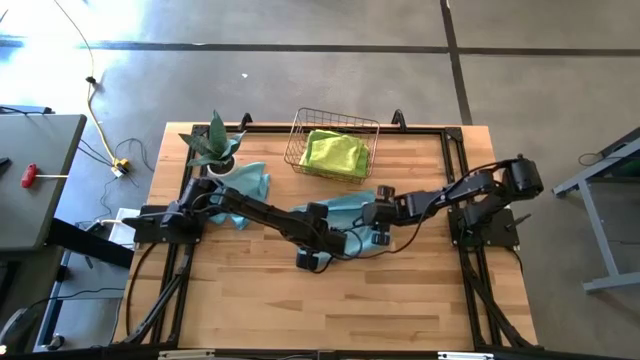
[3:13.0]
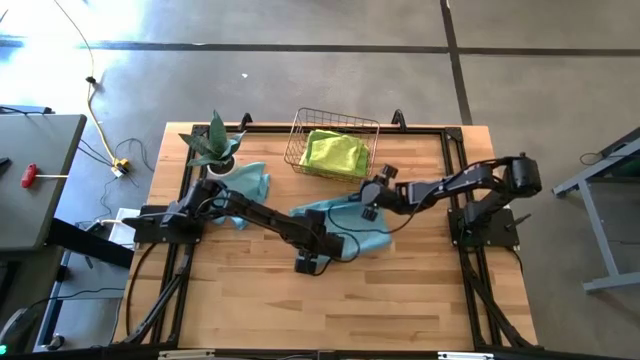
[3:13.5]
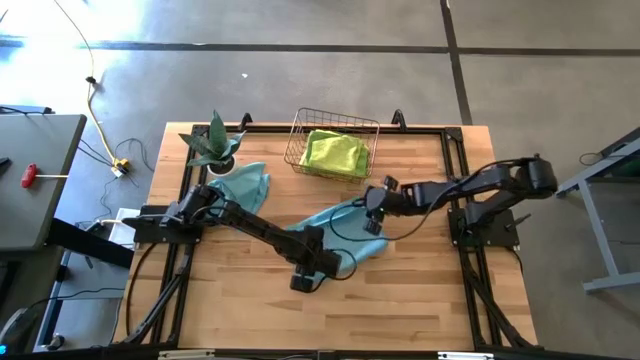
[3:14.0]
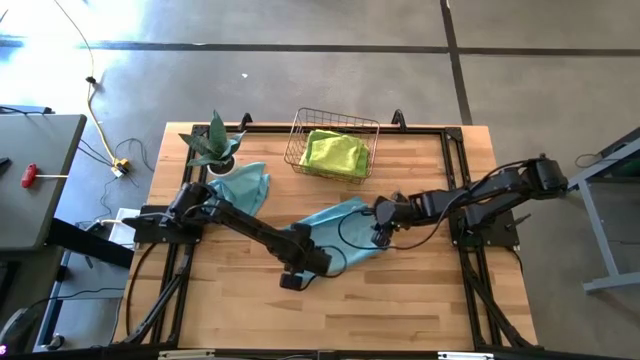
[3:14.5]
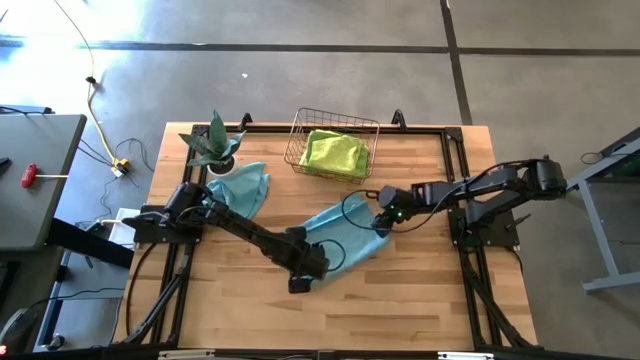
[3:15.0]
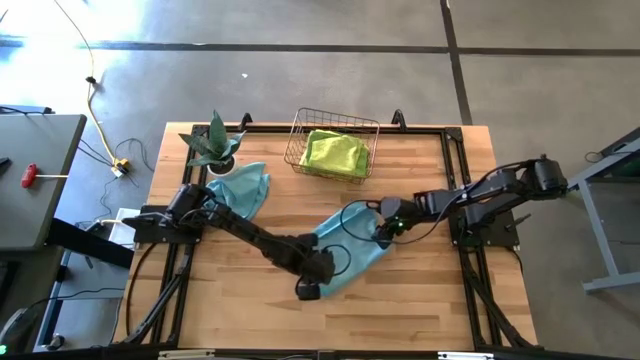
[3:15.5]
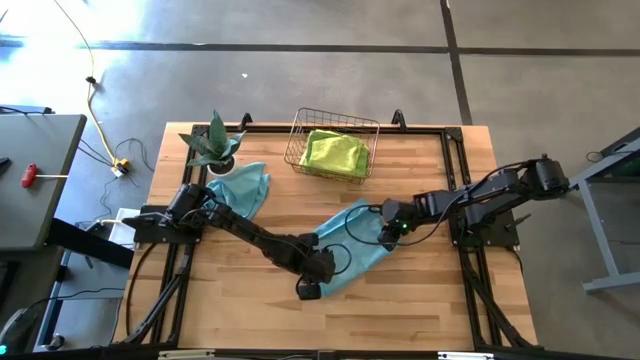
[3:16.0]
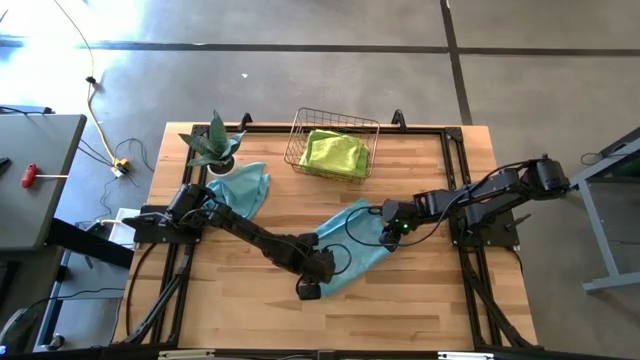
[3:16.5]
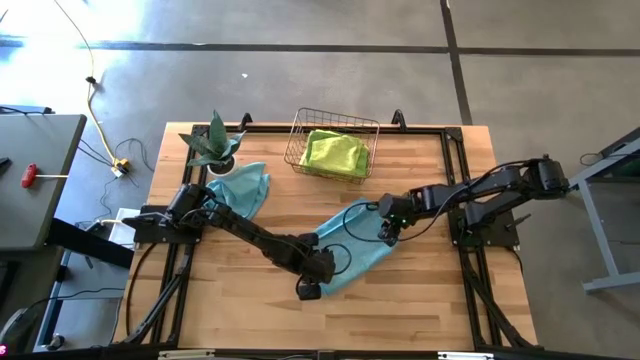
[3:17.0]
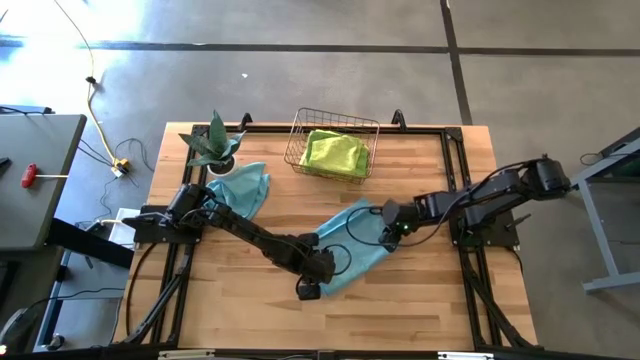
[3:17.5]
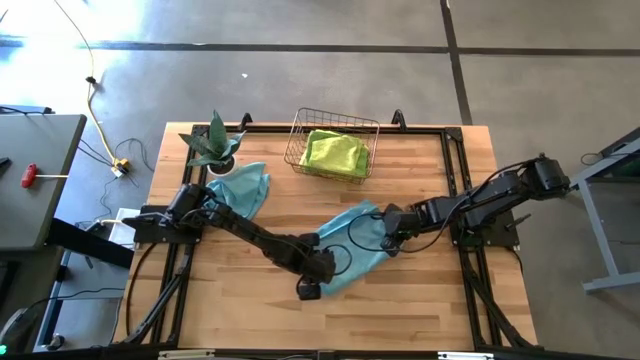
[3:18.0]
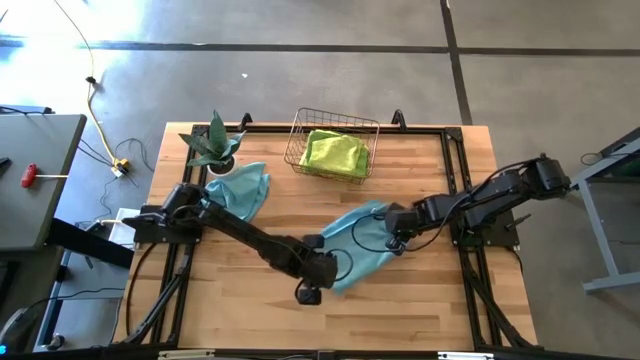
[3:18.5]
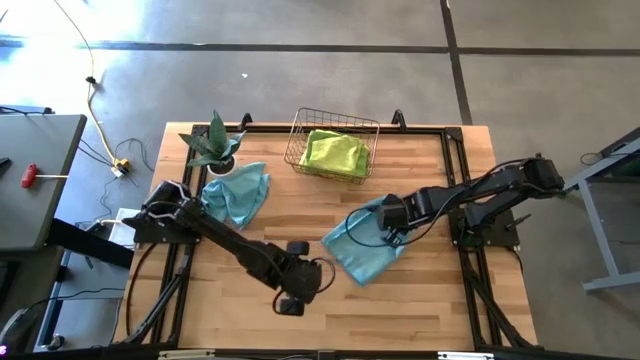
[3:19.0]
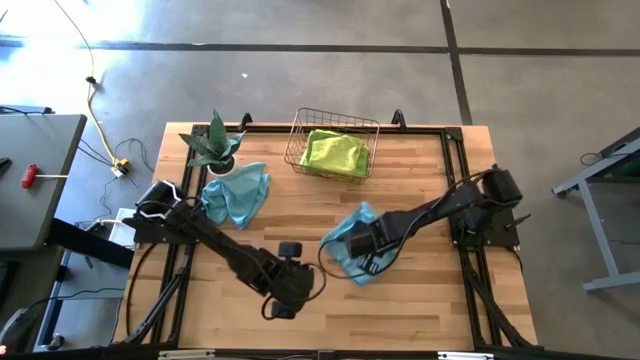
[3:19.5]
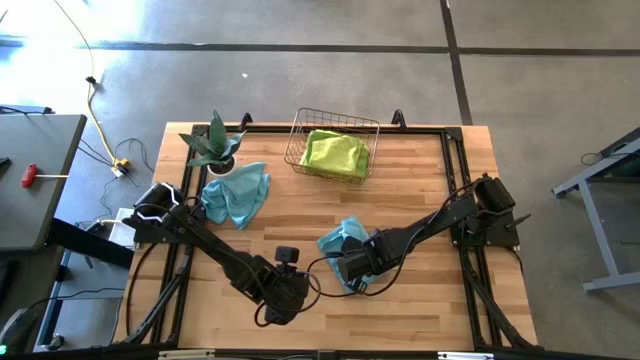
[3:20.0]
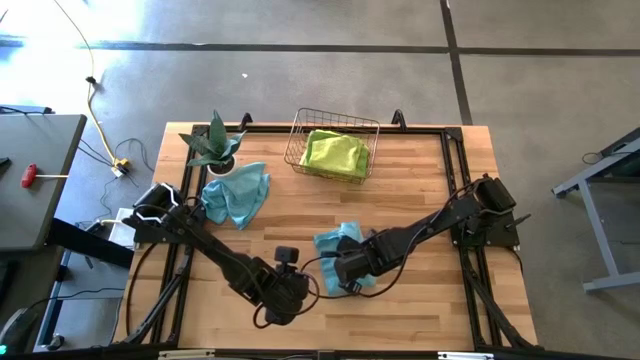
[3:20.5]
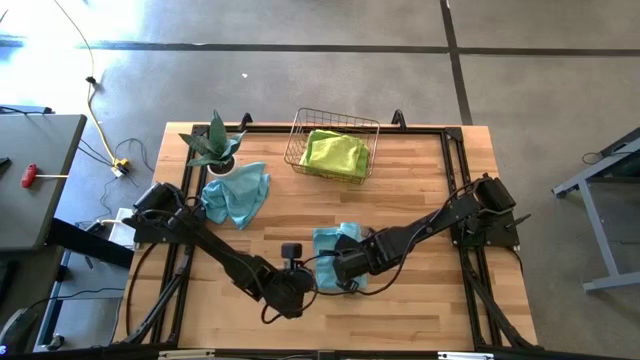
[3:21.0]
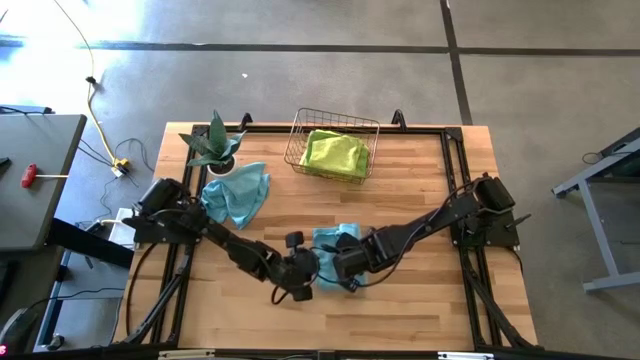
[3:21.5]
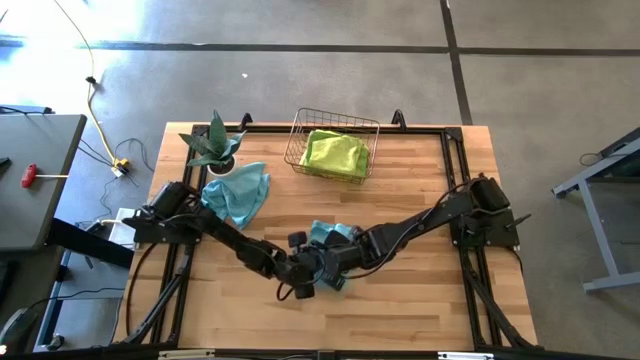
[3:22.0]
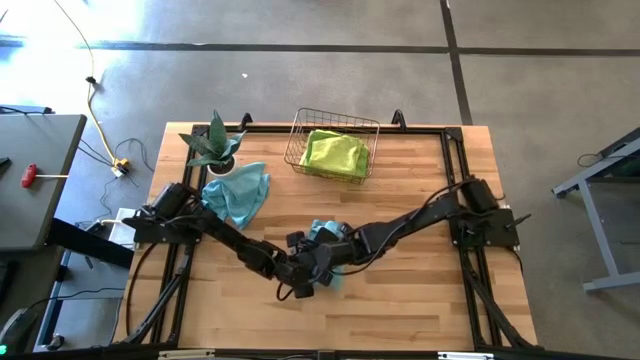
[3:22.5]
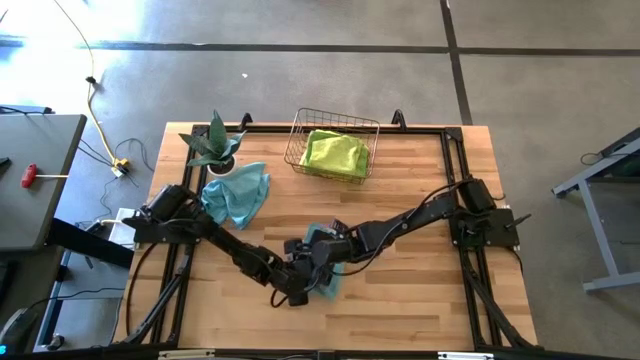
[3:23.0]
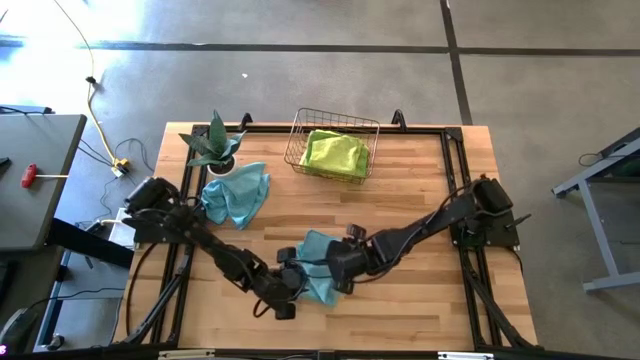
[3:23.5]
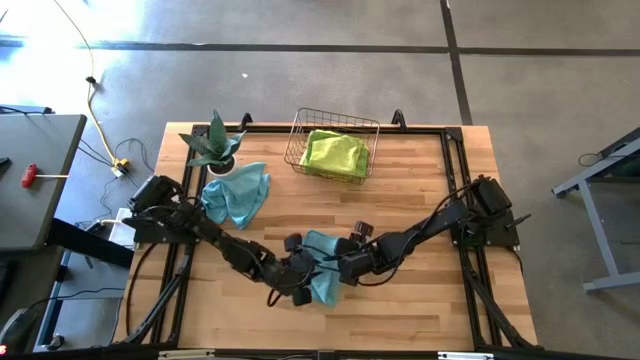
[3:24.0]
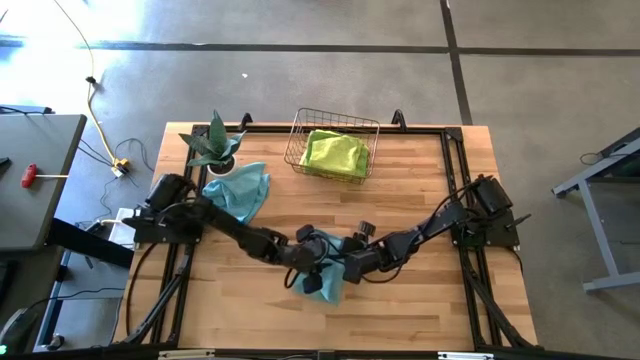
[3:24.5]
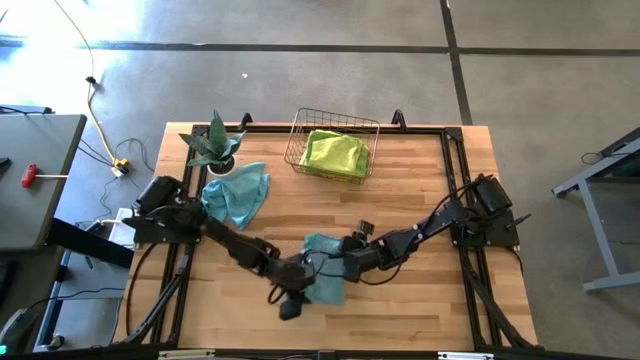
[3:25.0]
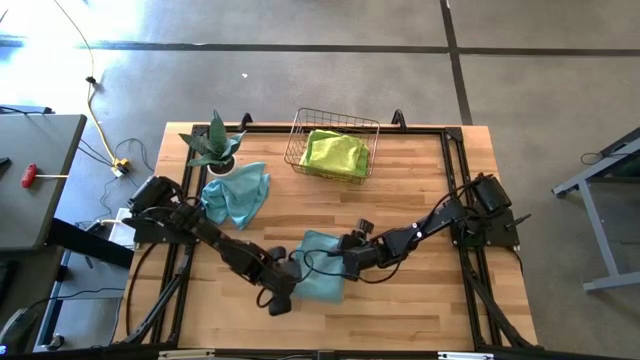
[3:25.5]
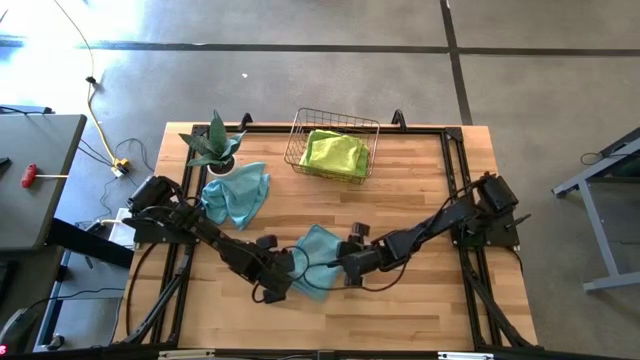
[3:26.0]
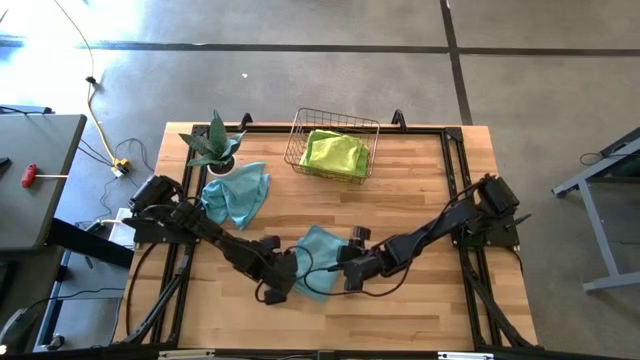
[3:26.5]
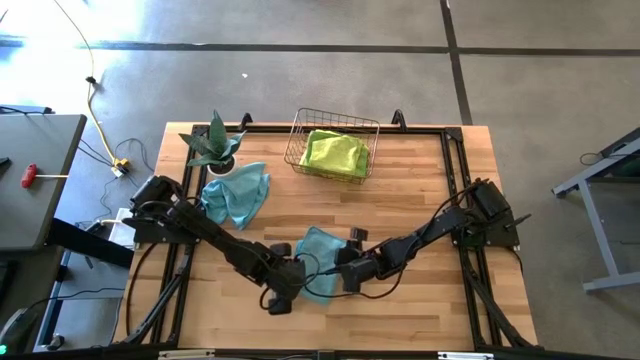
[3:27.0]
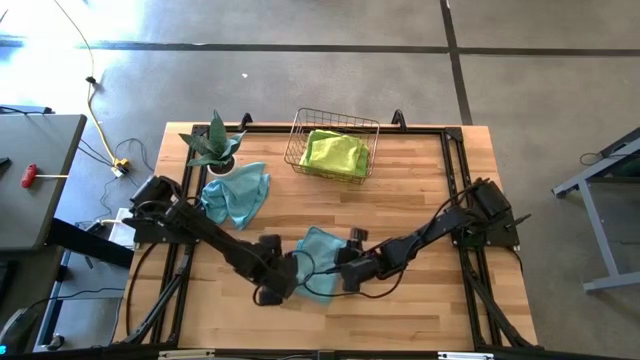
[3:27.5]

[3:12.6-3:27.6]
Task: Fold microfiber towels
Fold the bottom blue microfiber towel

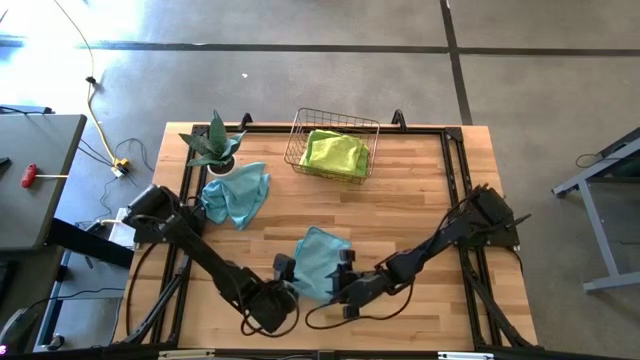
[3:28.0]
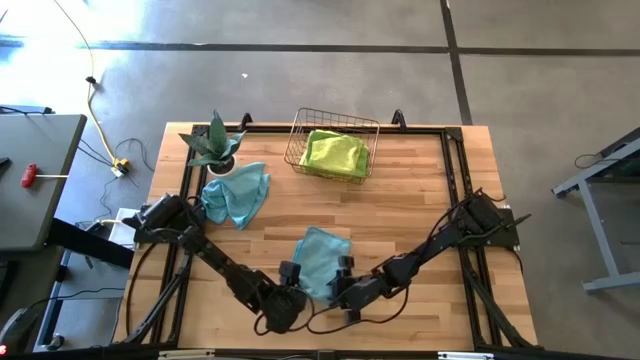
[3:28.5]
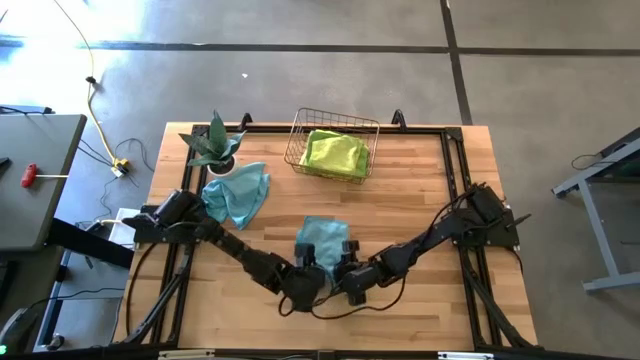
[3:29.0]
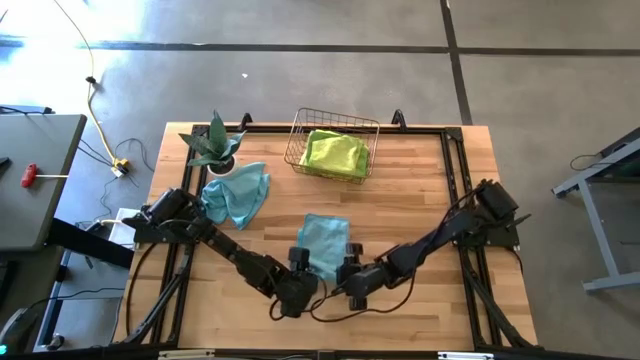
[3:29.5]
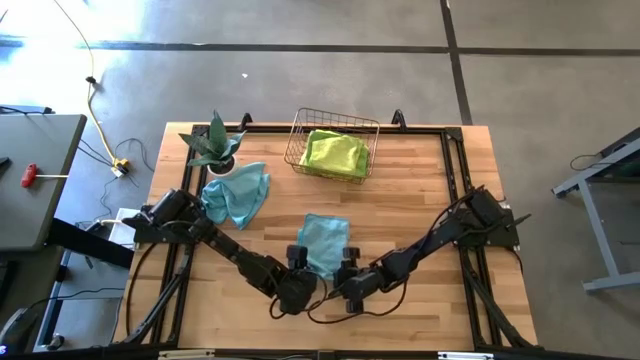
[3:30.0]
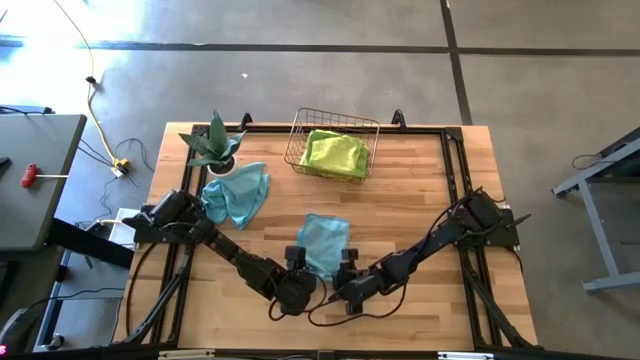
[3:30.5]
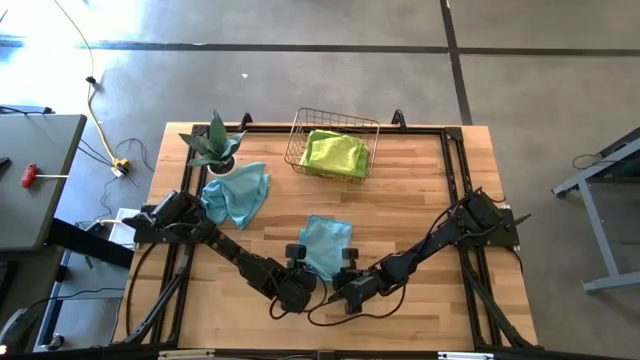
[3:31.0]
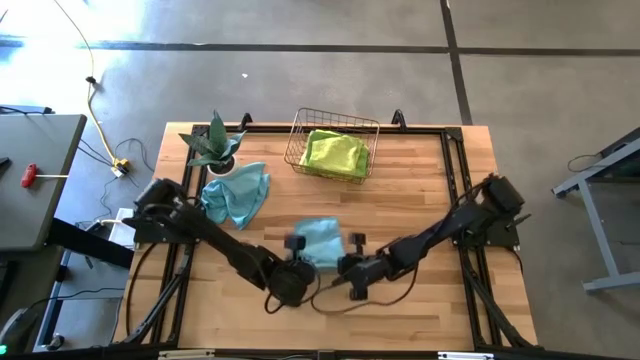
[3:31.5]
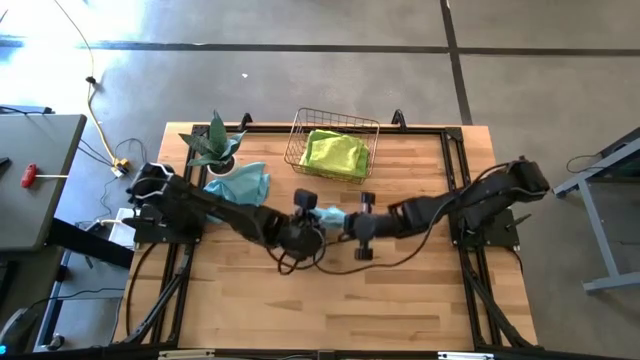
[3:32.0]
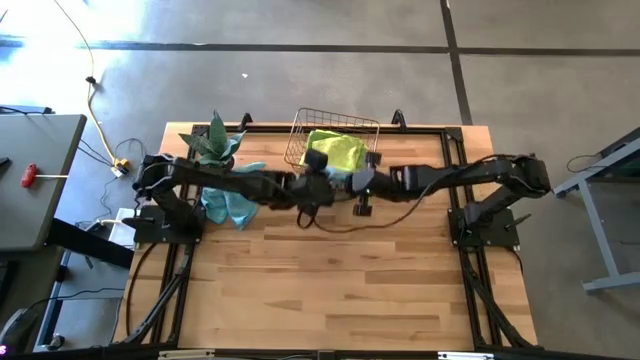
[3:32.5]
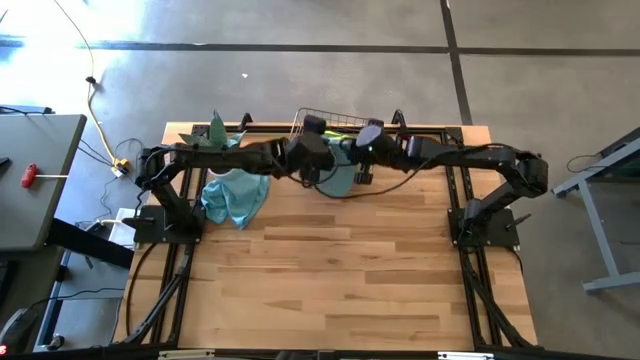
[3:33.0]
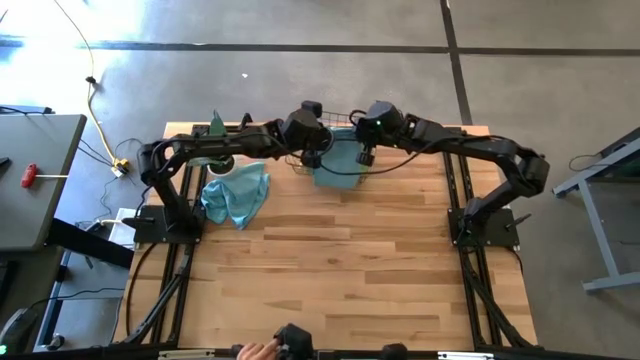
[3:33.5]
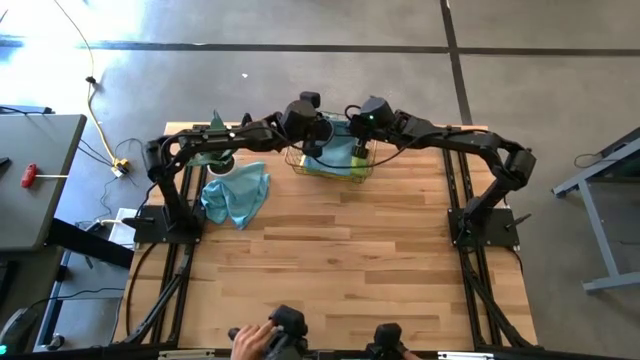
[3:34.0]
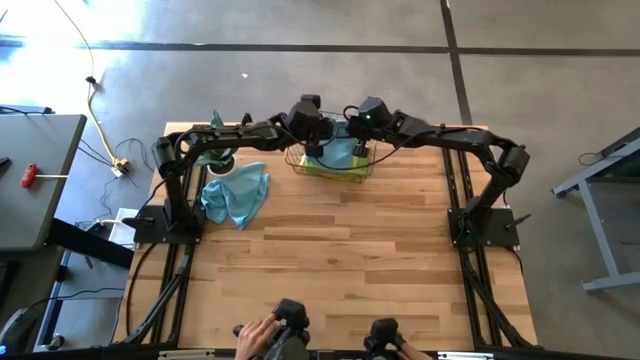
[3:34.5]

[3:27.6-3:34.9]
Put the bottom blue microfiber towel into the wire basket
